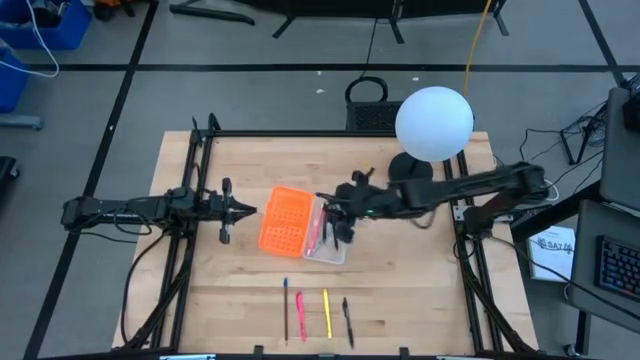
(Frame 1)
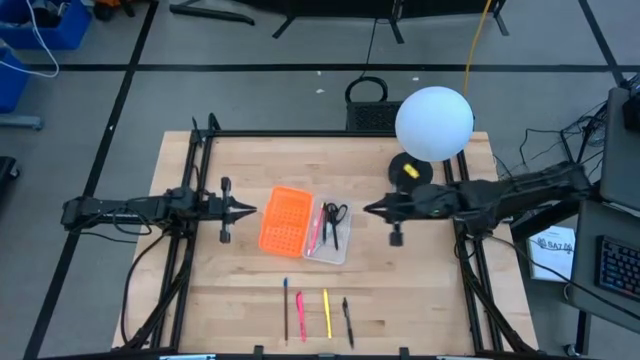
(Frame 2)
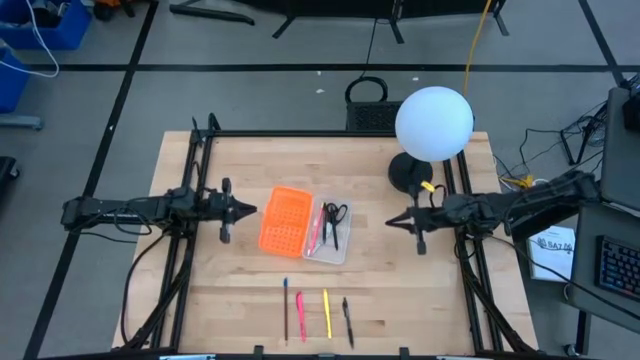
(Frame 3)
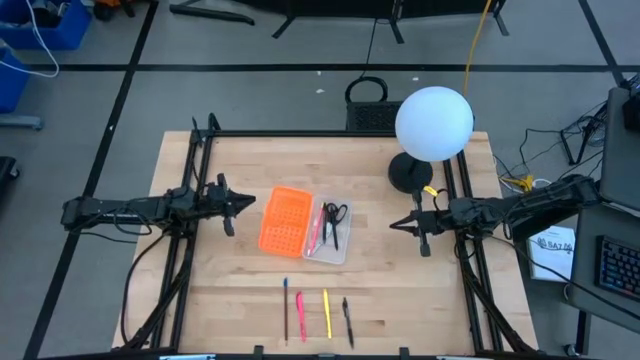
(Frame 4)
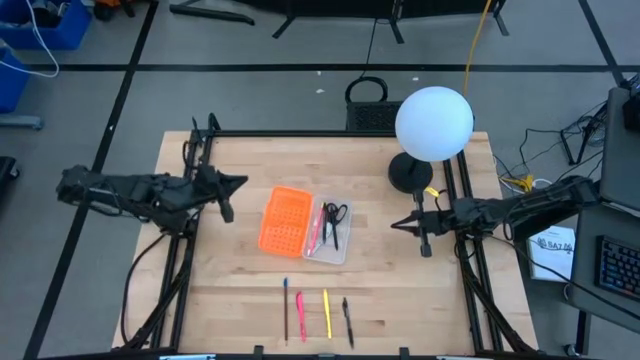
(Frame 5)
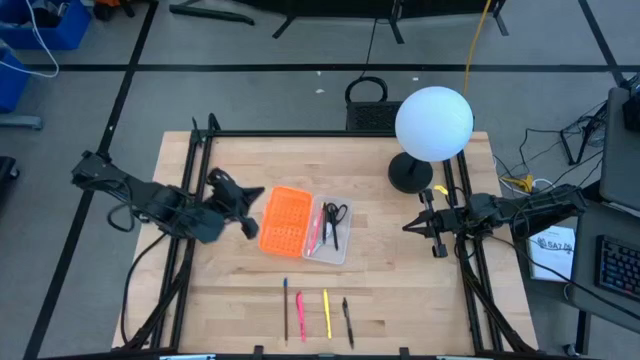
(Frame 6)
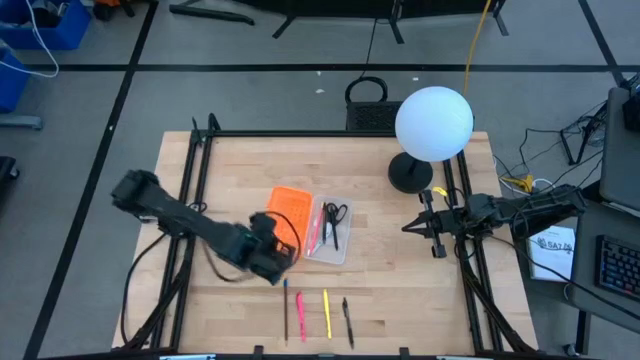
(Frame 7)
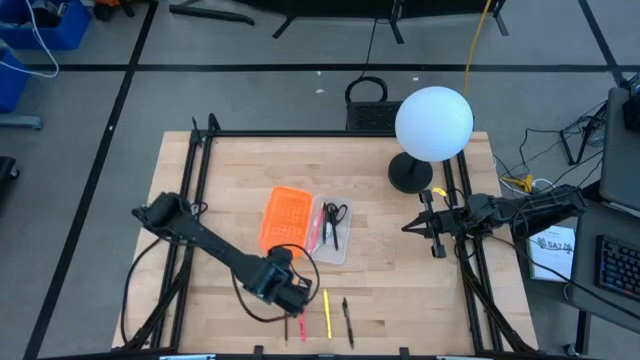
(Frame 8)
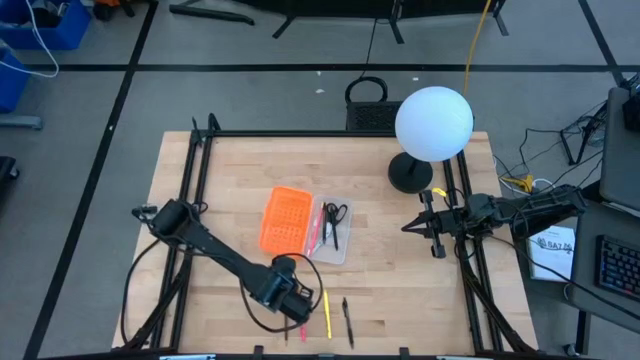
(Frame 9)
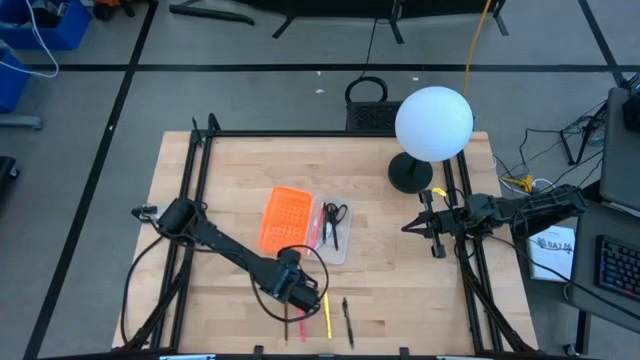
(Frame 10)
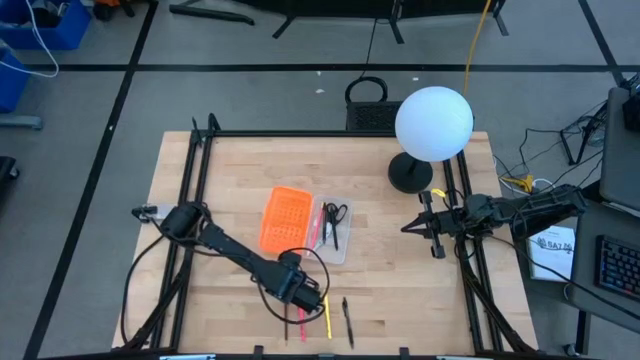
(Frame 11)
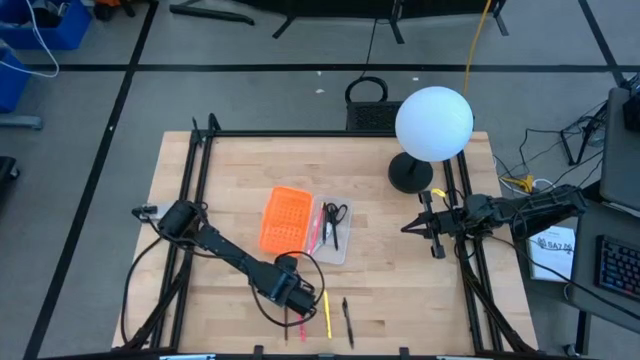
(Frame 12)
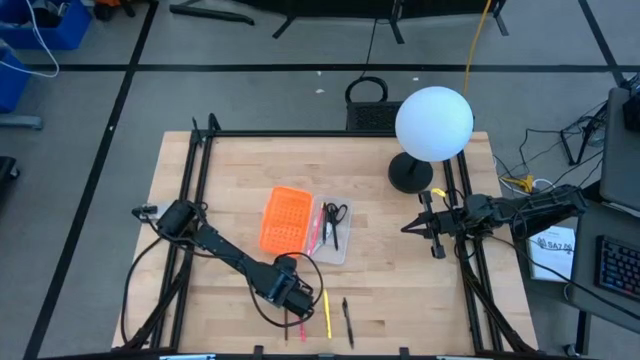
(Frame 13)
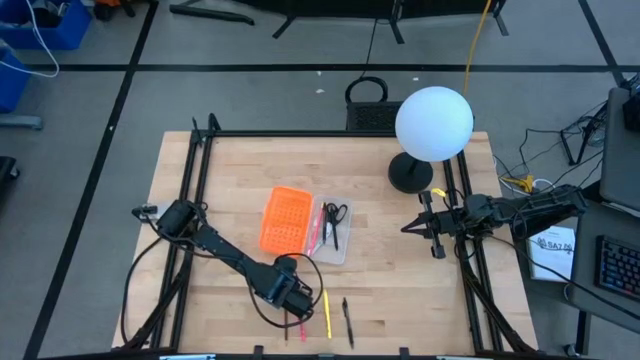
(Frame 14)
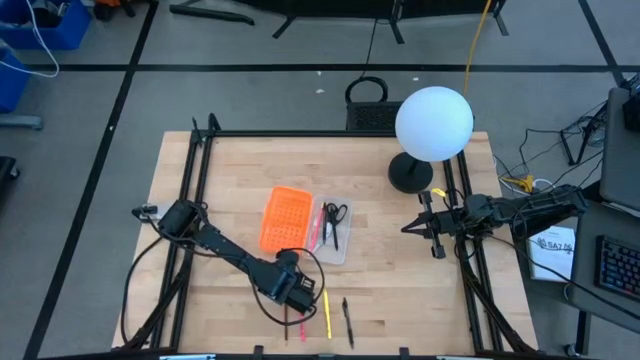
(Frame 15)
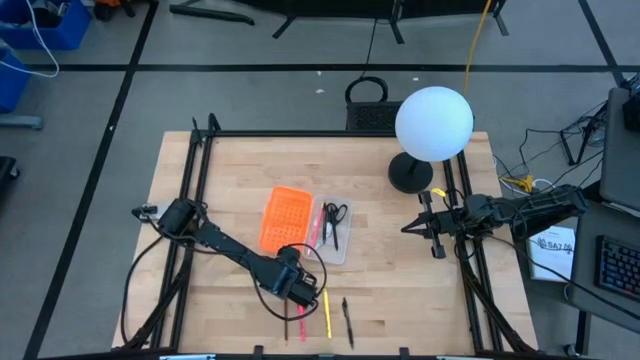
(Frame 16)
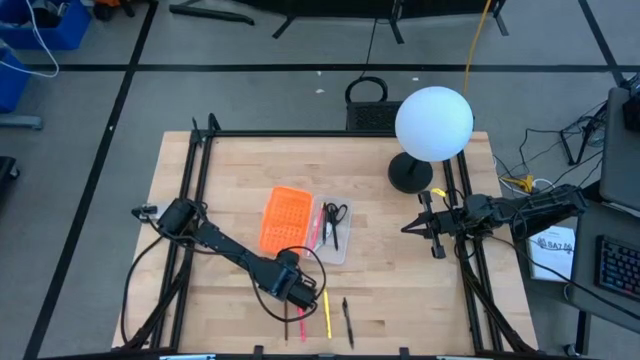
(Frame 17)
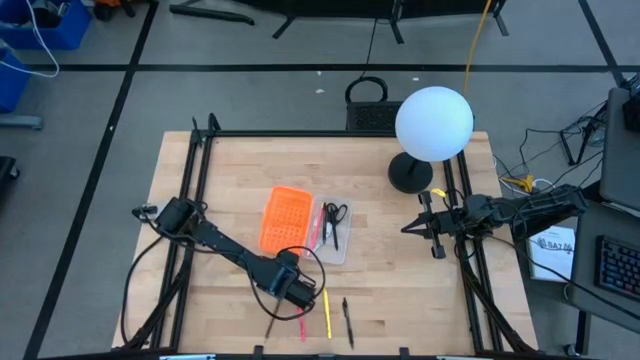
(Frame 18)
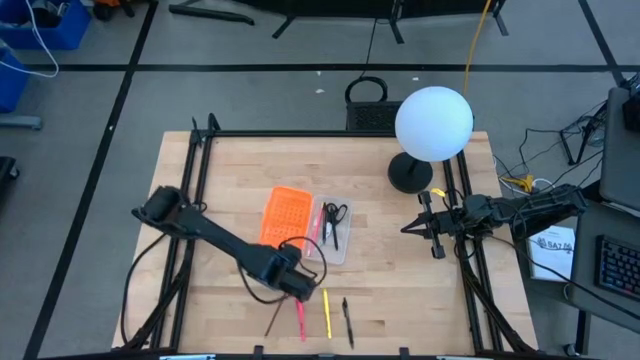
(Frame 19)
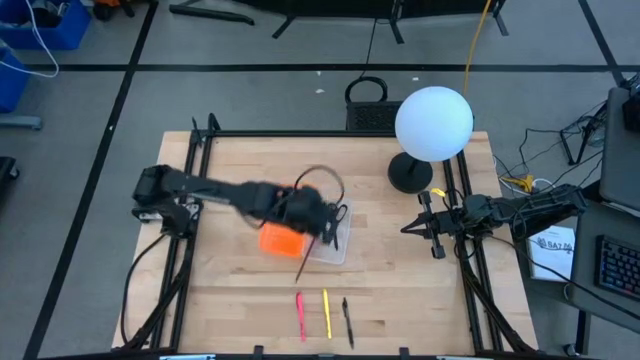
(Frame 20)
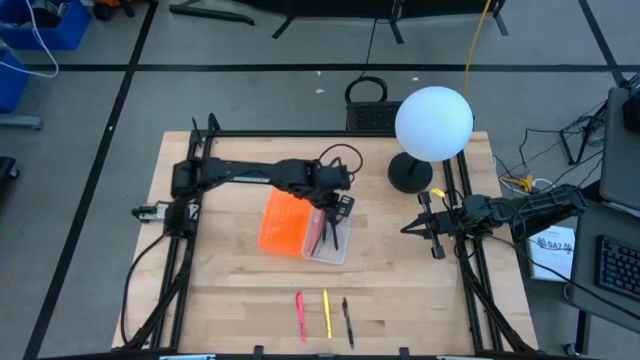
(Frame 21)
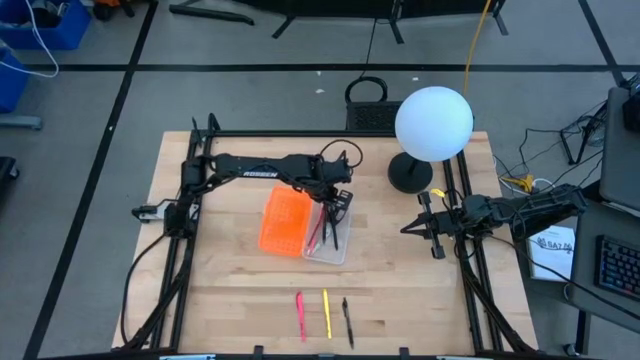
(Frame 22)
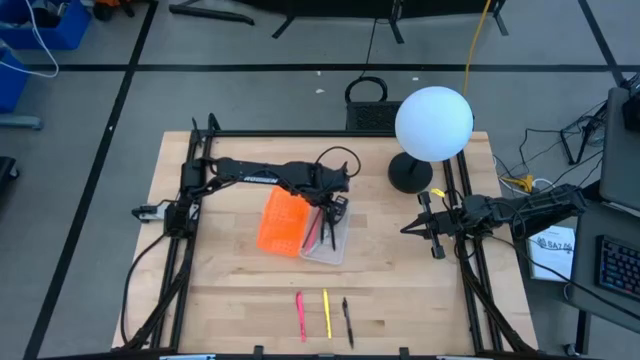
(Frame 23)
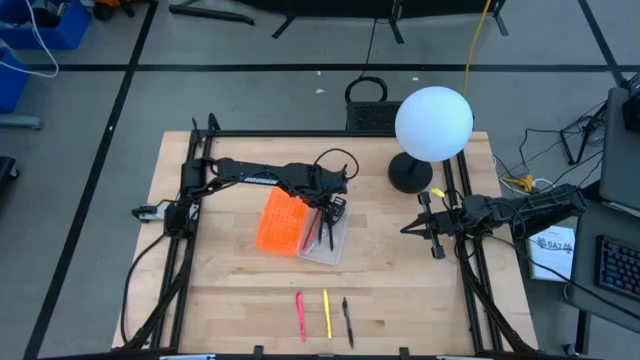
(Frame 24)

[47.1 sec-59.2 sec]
Task: Pick & place school supplies into a supply box
Put the brown pencil into the supply box

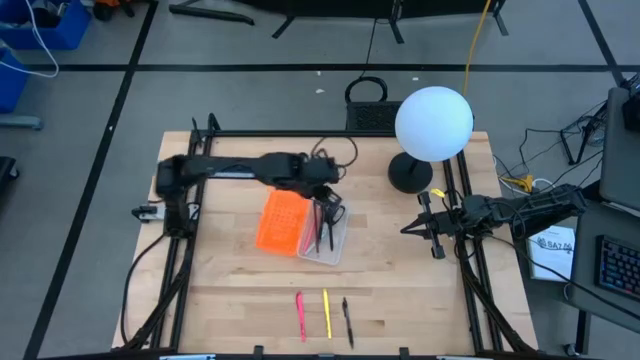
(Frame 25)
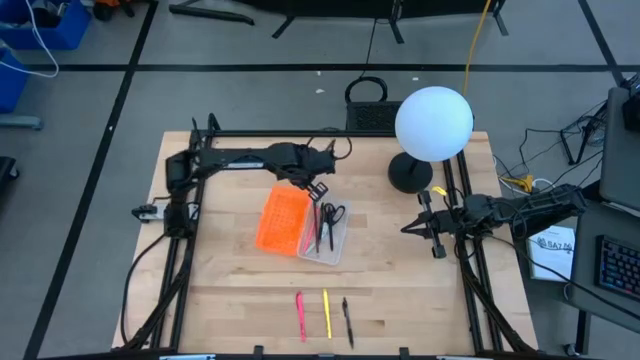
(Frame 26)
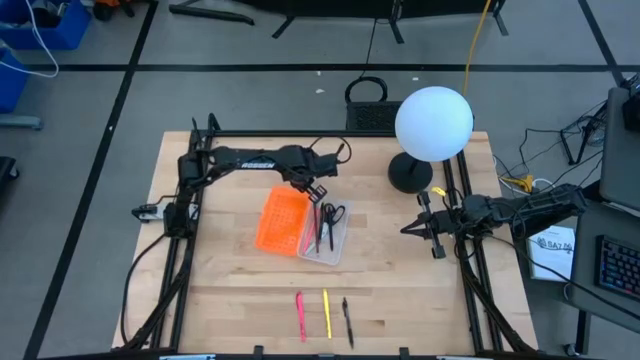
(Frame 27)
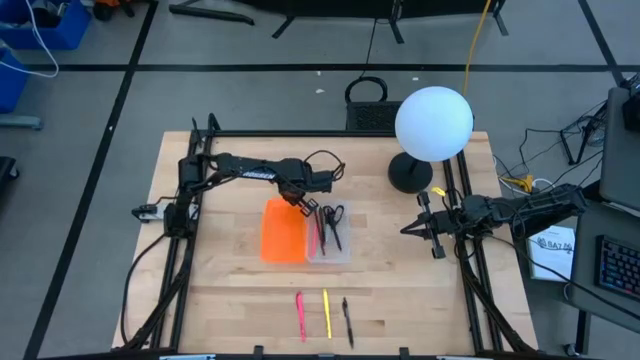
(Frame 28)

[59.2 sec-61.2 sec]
Adjust the supply box

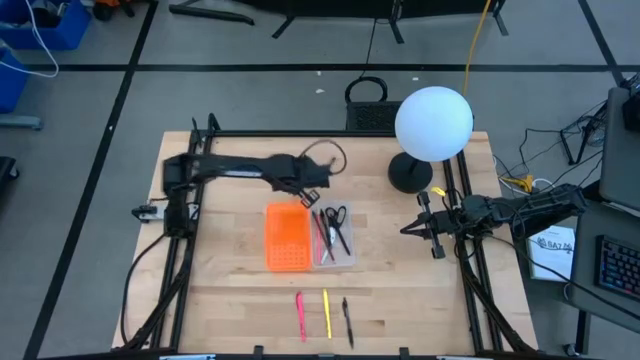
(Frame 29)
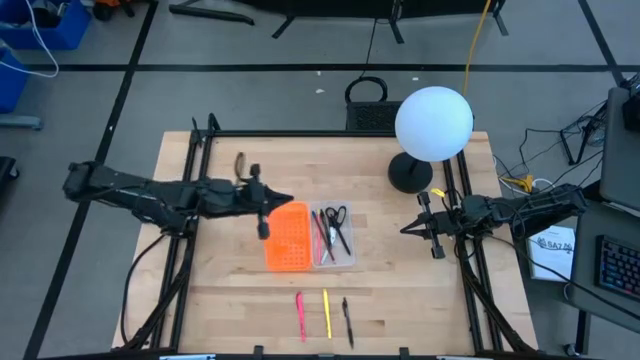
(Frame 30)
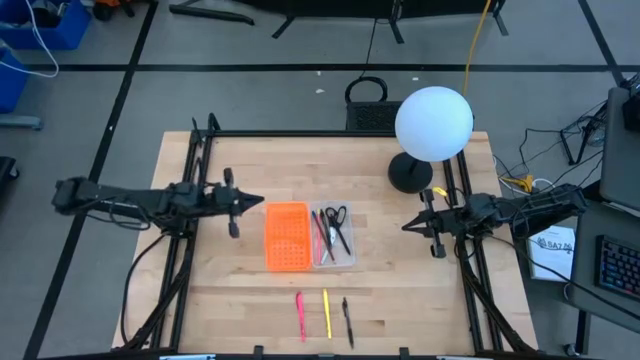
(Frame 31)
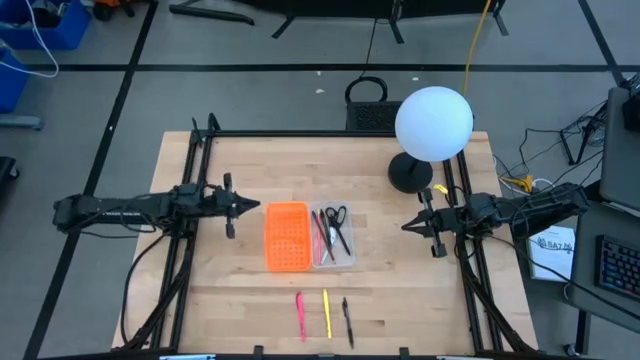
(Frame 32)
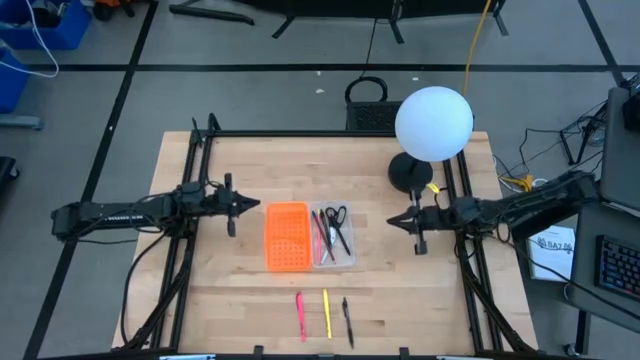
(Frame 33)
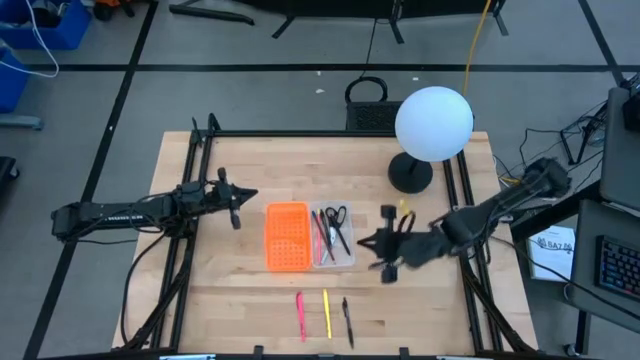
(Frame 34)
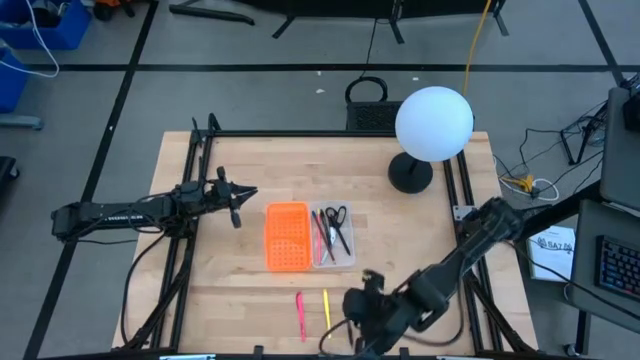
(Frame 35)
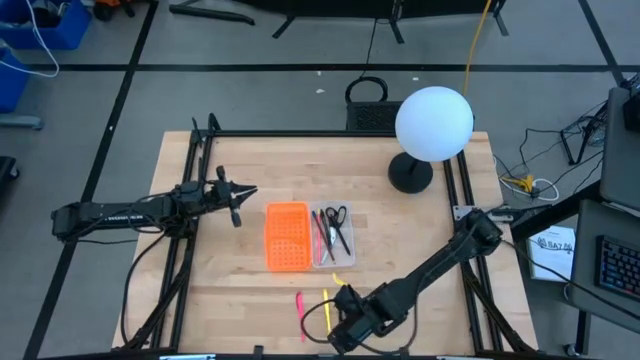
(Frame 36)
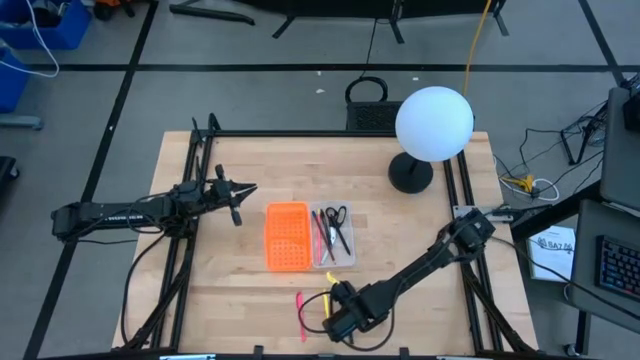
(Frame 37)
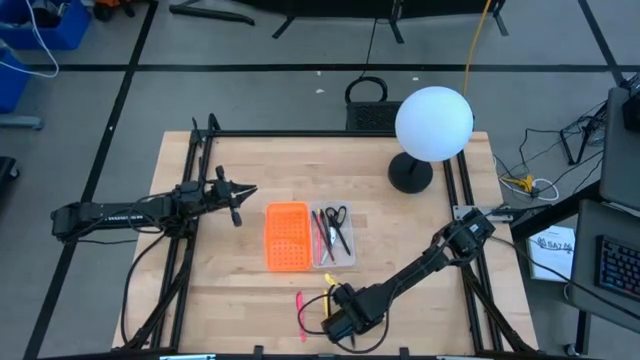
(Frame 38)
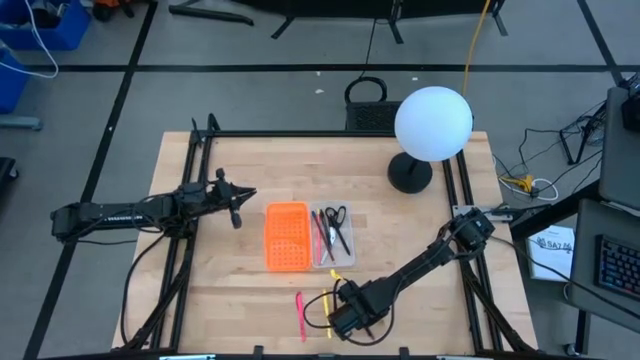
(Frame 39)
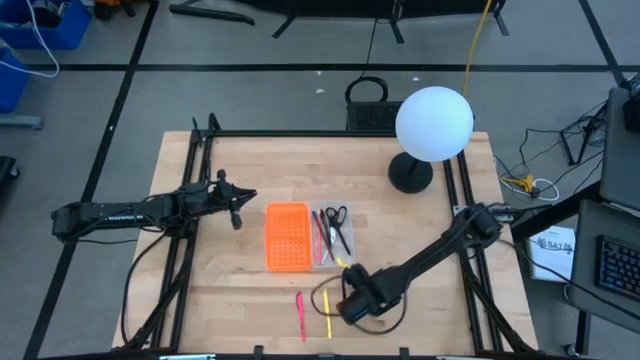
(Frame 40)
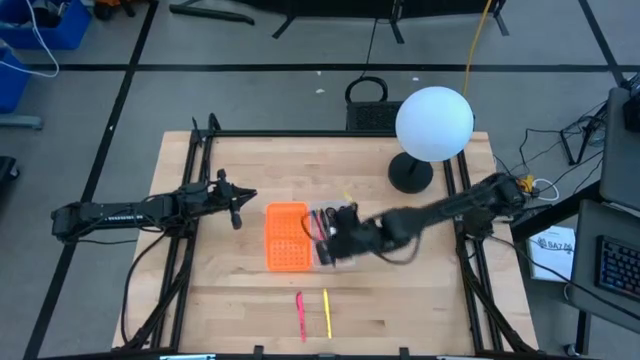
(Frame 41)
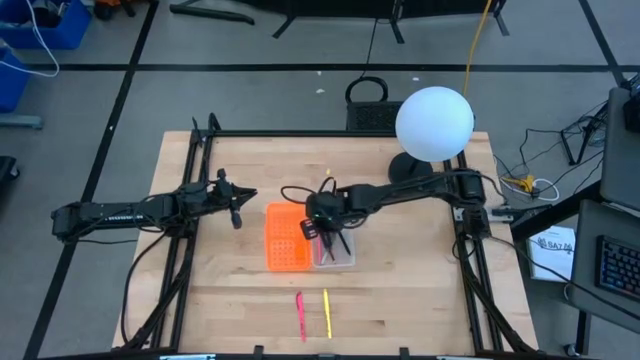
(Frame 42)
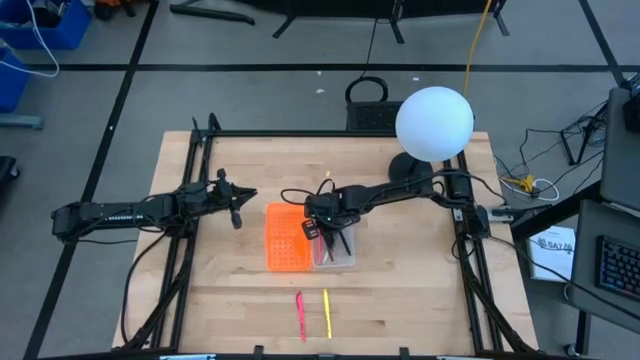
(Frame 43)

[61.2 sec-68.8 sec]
Put the black pen into the supply box
